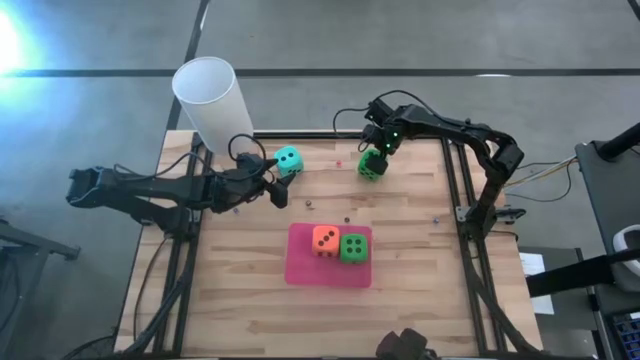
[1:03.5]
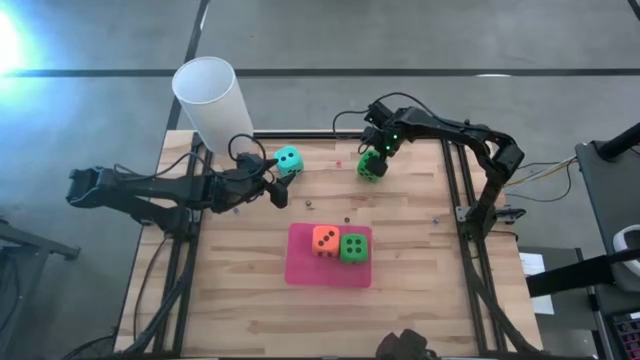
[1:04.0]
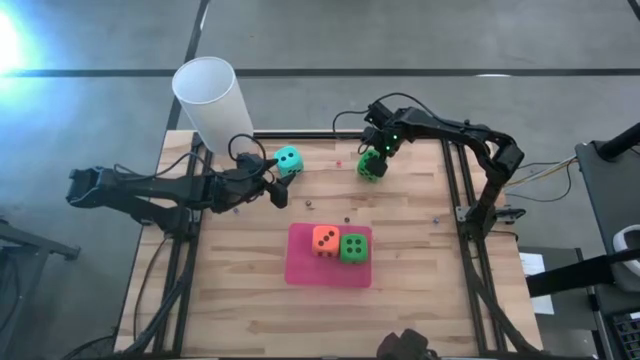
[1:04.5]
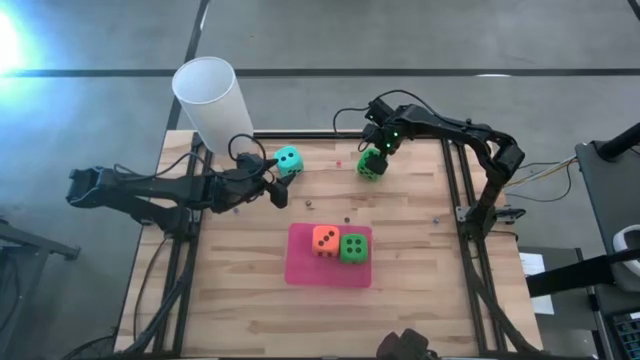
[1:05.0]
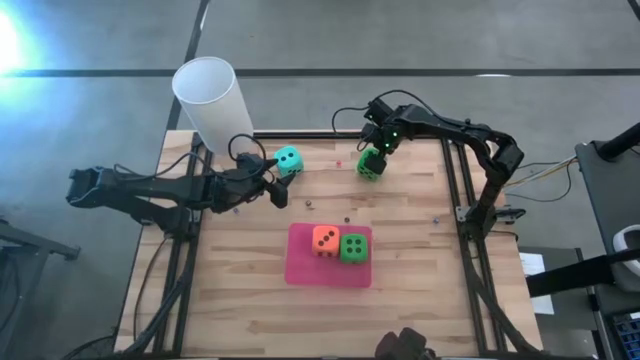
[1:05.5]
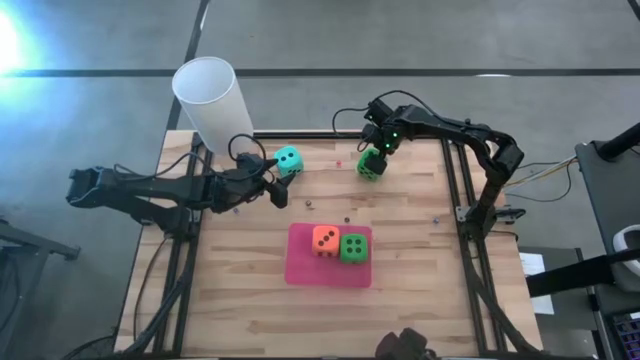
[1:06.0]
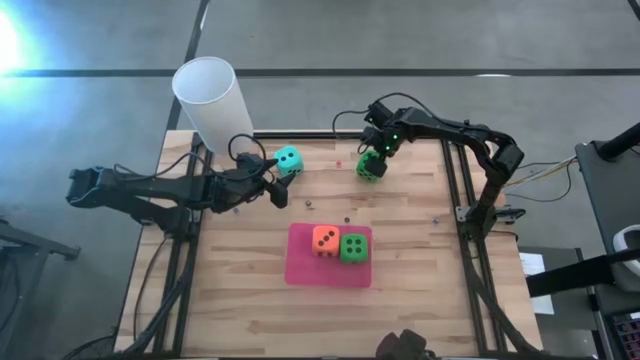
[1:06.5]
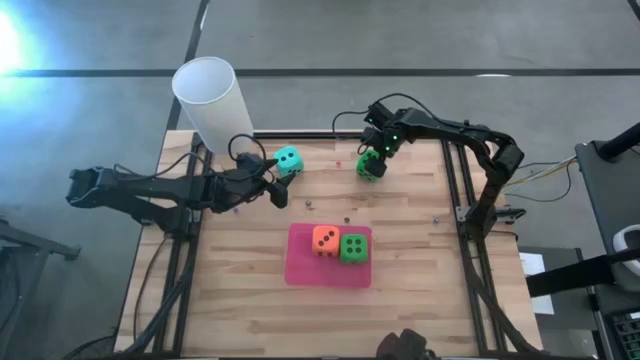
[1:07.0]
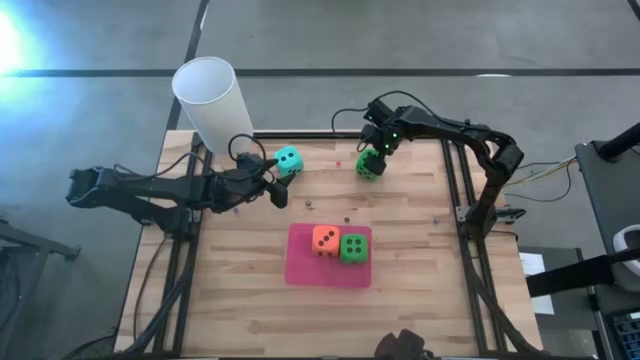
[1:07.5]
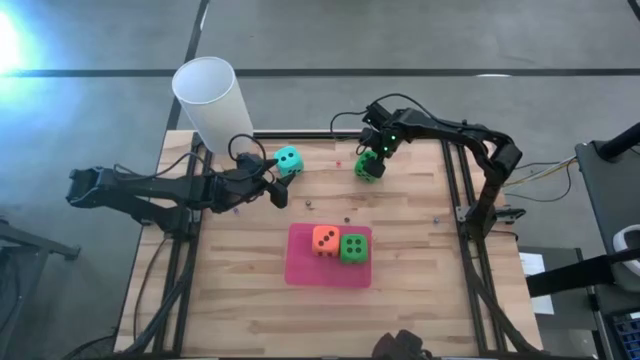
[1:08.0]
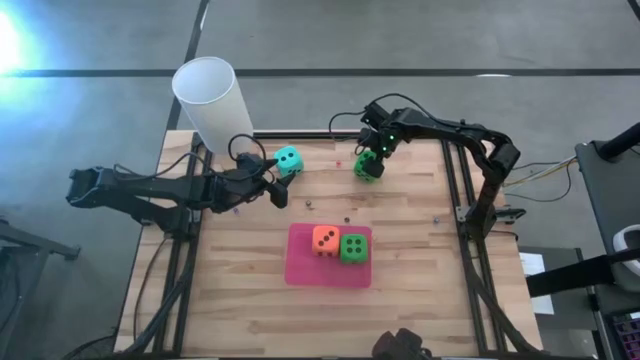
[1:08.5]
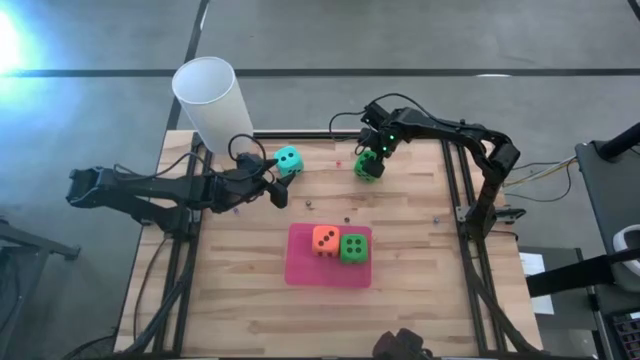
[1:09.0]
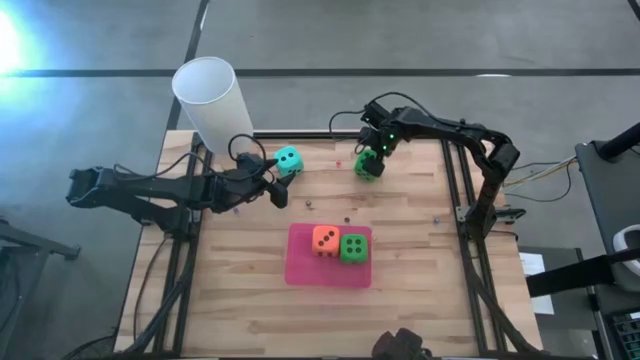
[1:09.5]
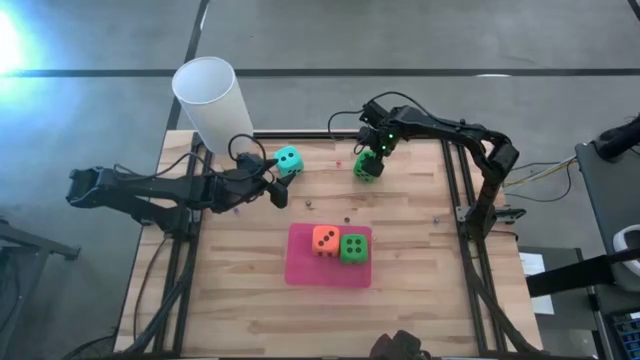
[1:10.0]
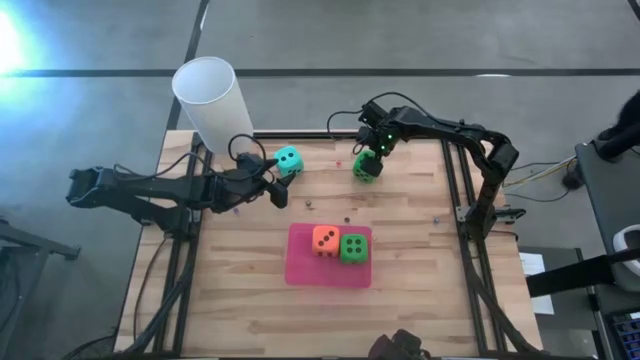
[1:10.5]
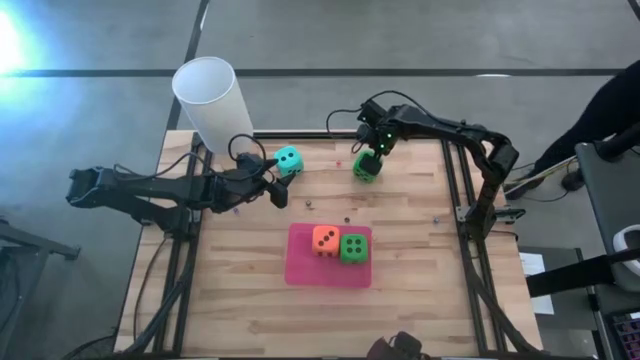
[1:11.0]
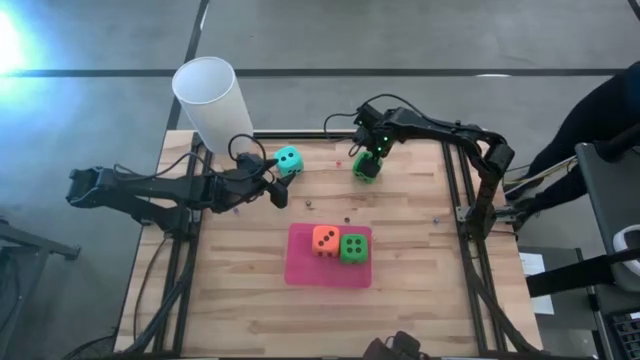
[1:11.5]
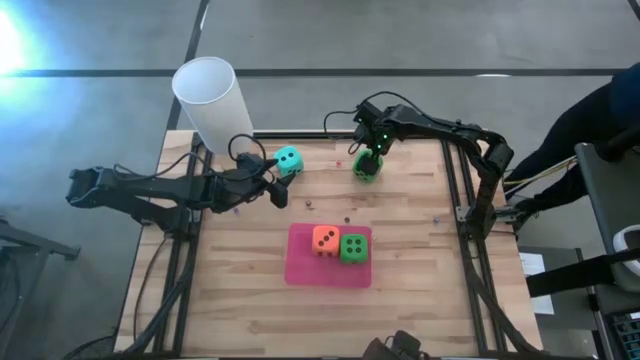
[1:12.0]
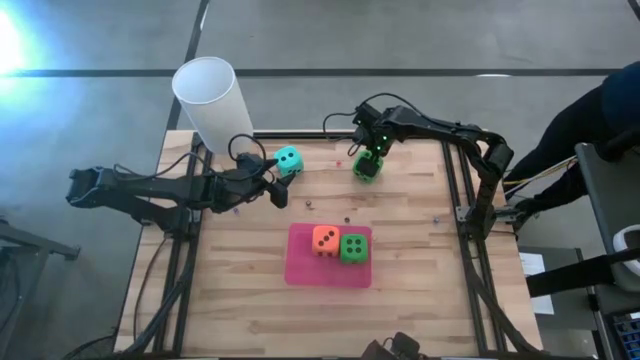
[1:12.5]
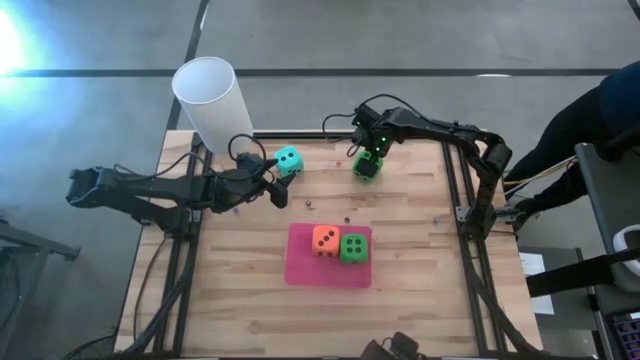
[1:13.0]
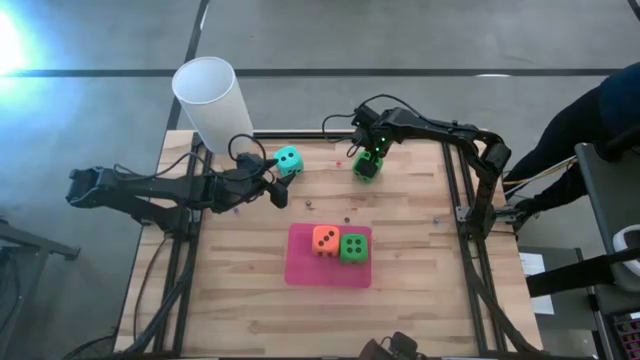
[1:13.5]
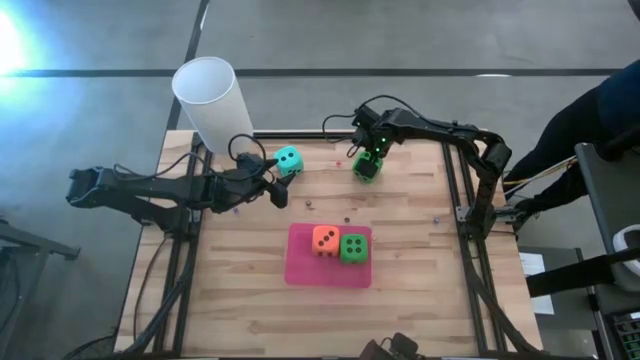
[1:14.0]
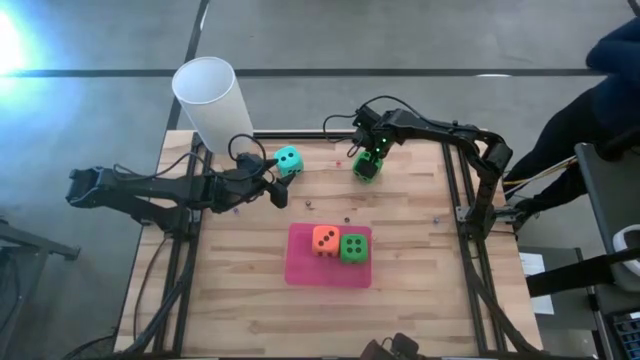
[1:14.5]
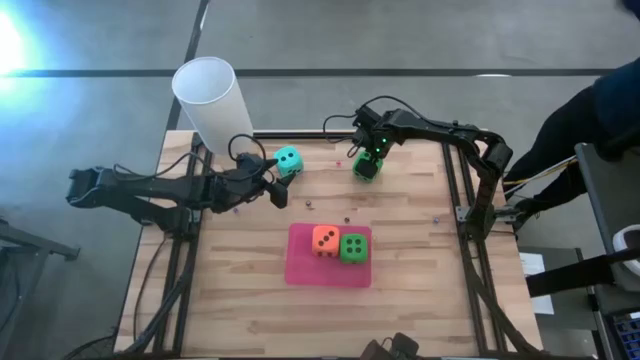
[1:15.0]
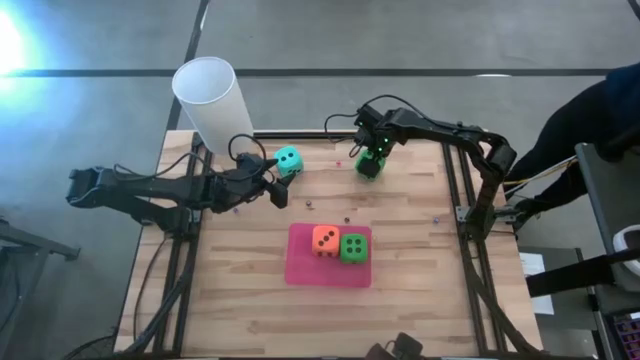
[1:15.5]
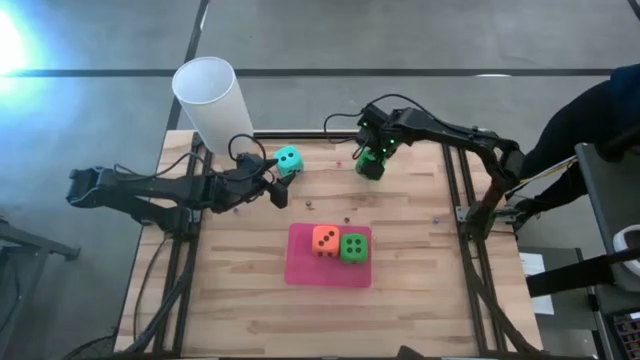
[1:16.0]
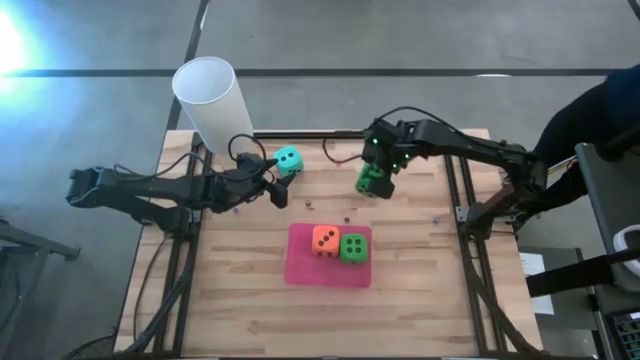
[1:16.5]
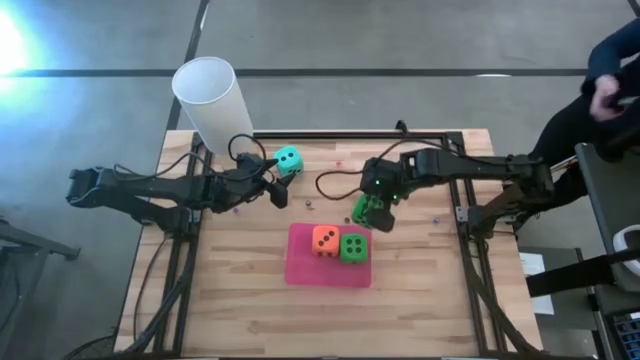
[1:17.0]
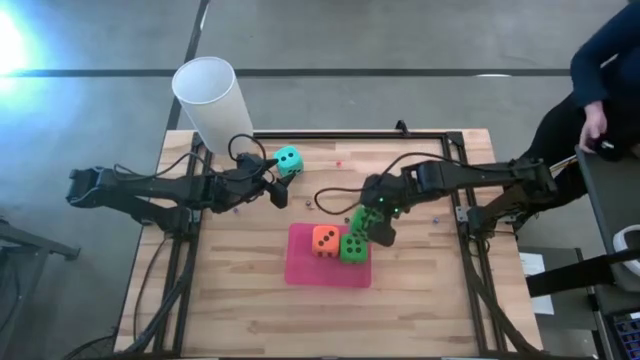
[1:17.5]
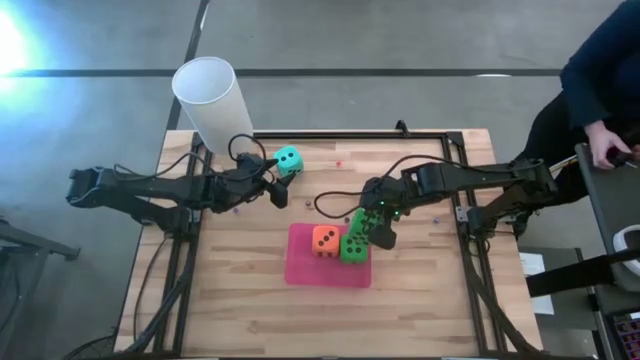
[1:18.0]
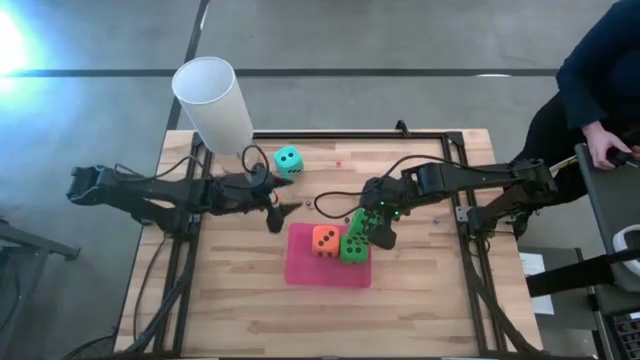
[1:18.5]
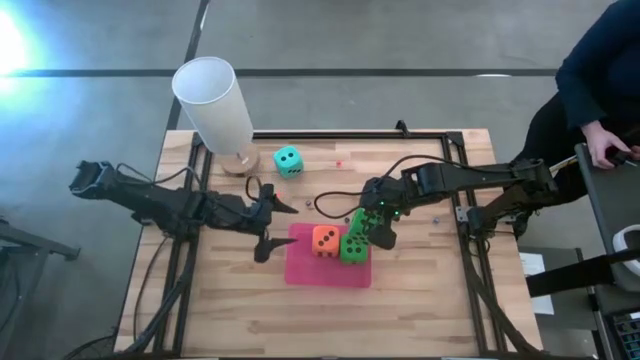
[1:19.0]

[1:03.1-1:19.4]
Task: Pick & Place Dice
Put the large green dice into the pink bin

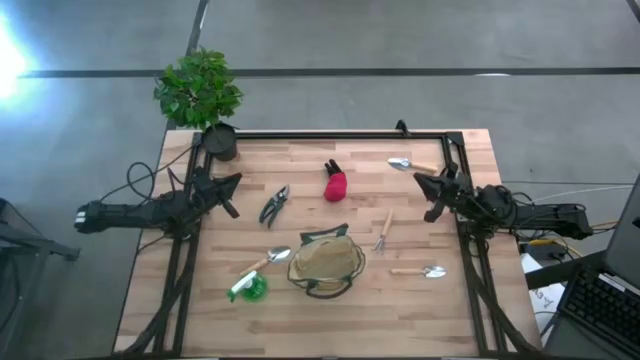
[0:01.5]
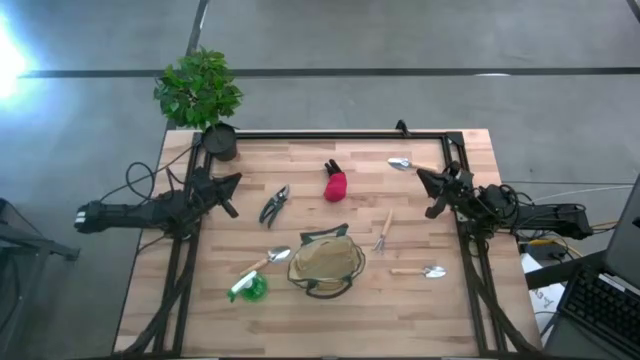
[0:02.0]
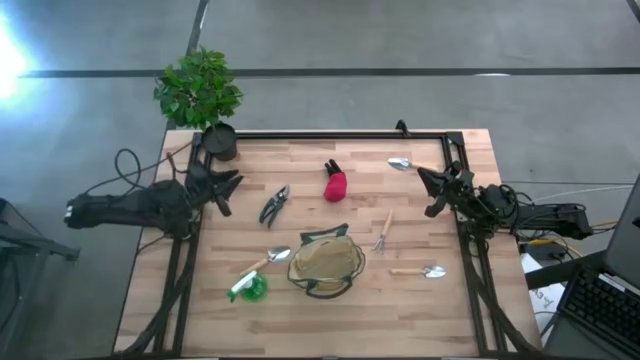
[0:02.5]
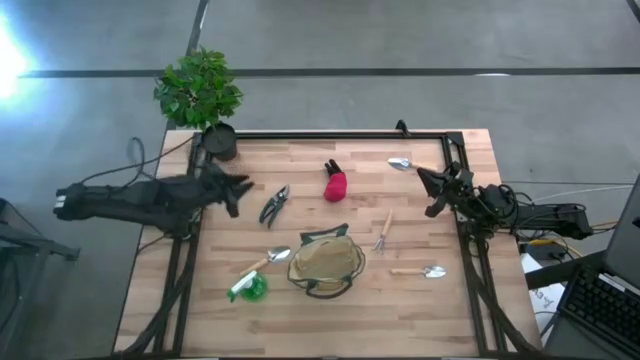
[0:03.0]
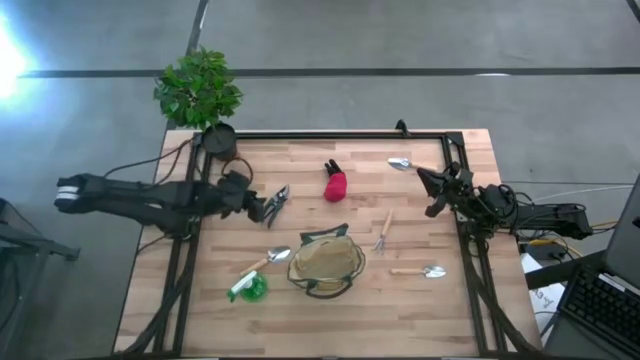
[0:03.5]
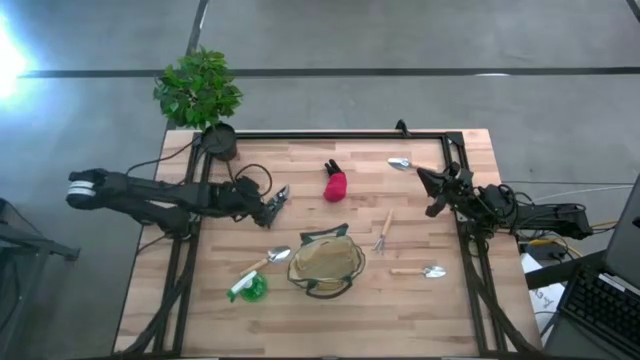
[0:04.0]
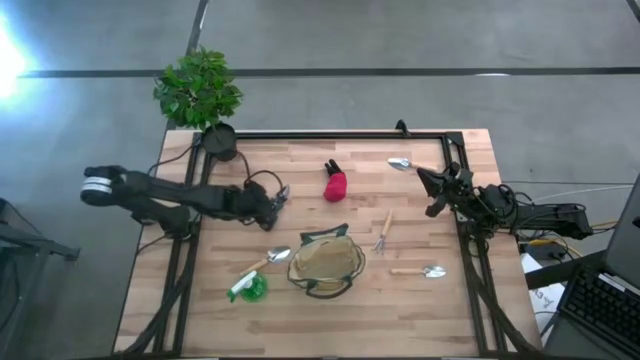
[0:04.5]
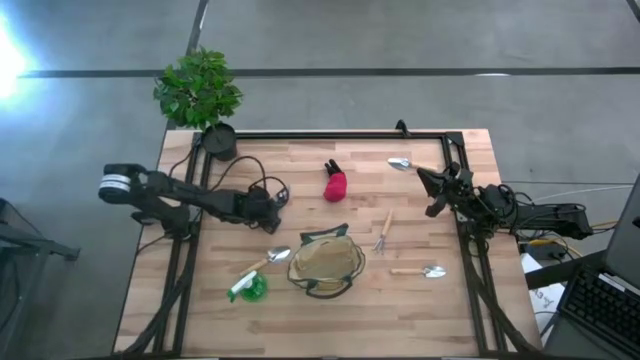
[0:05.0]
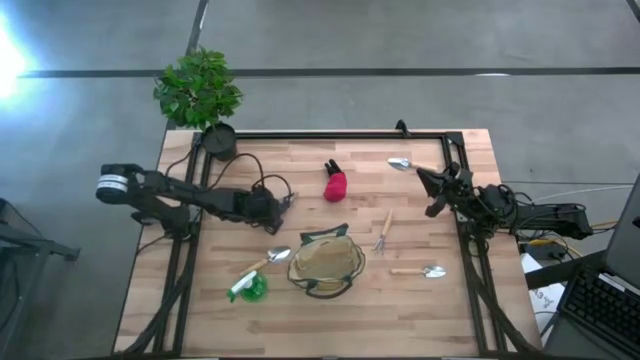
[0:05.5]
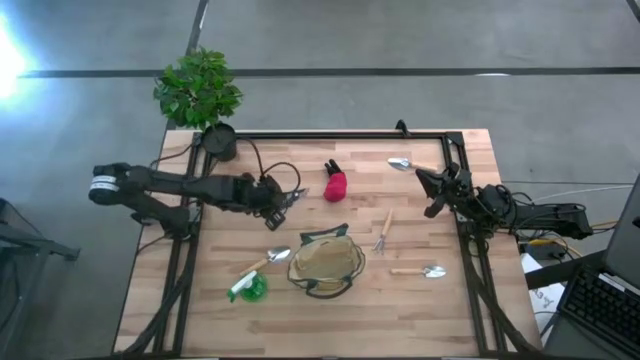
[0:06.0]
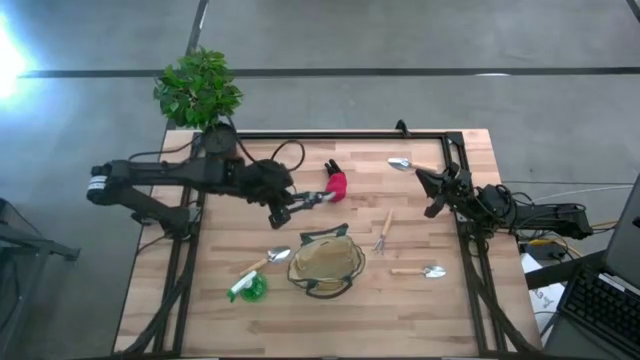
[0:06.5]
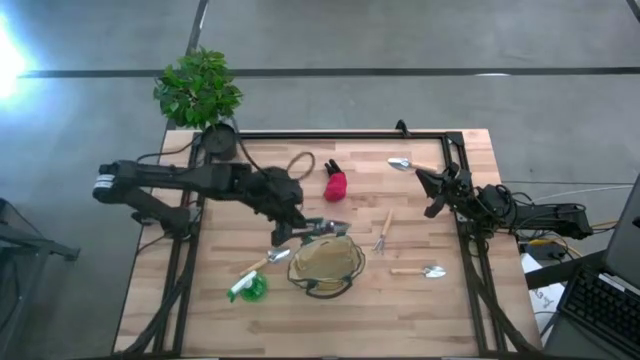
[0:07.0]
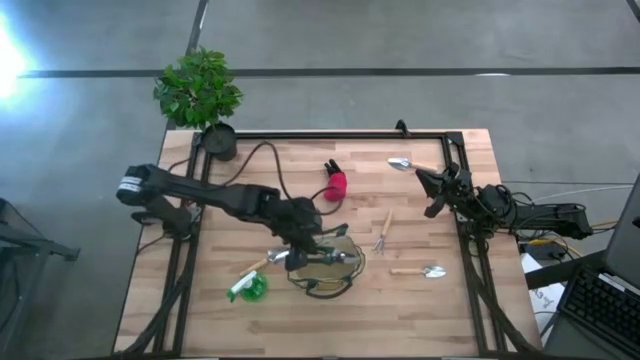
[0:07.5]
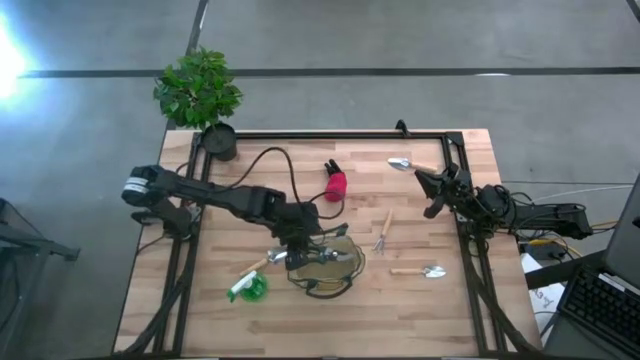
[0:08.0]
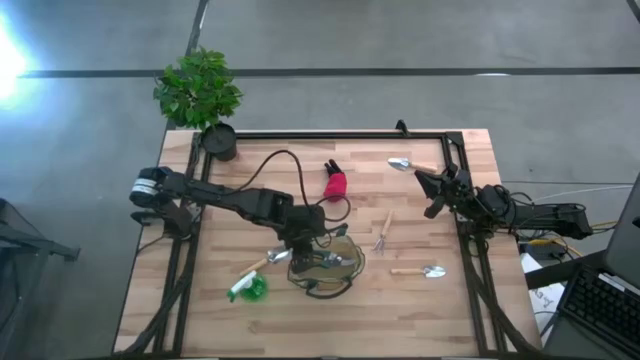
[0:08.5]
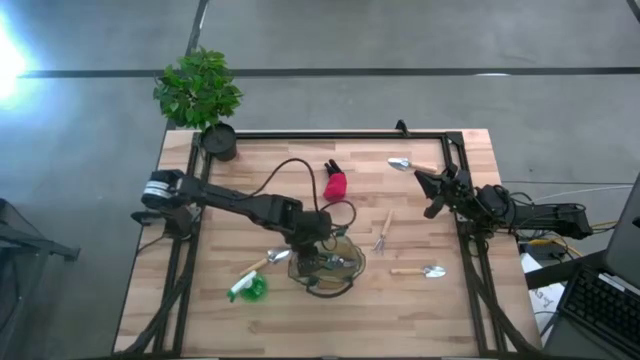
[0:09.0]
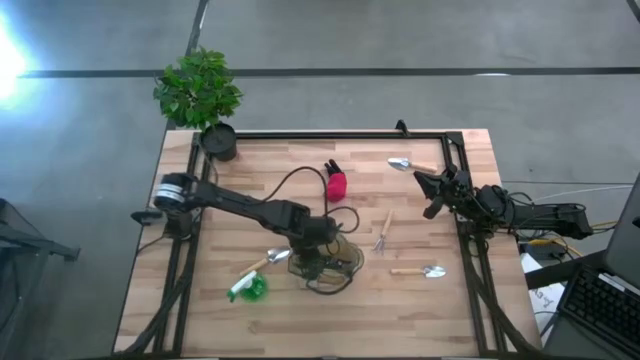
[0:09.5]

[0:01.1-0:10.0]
Task: Pick & Place Garden tools in Gardening bag
Put the shear scissors into the gardening bag
